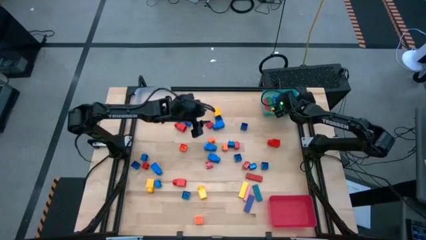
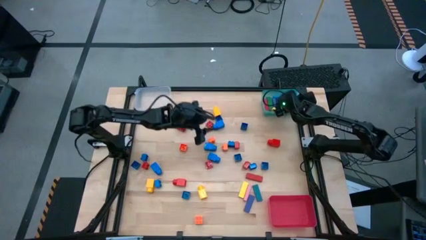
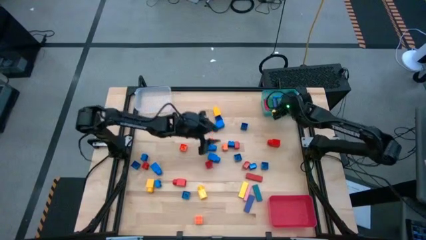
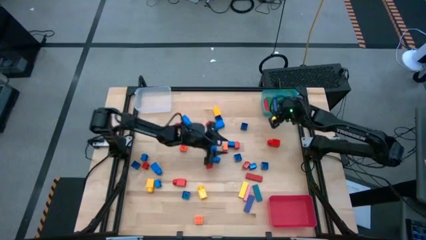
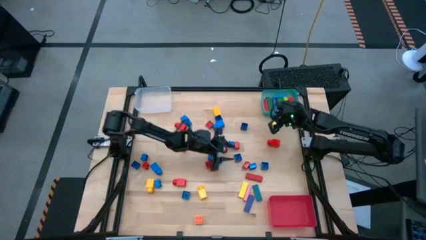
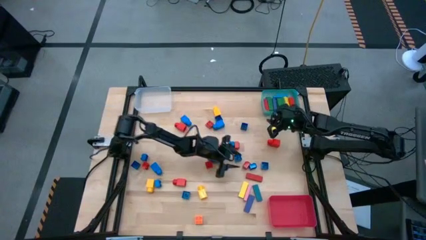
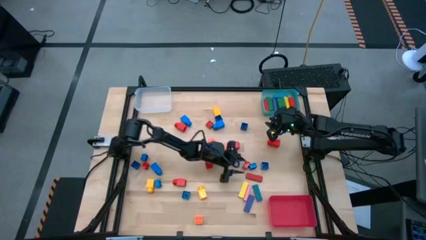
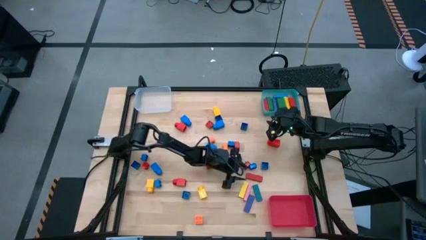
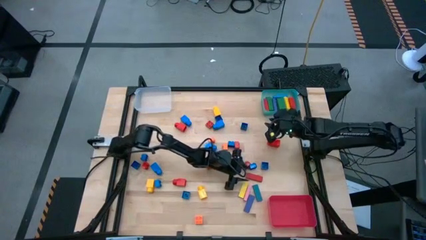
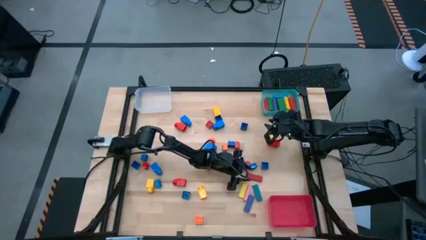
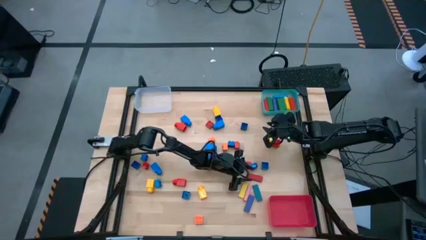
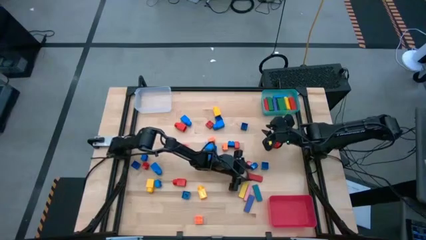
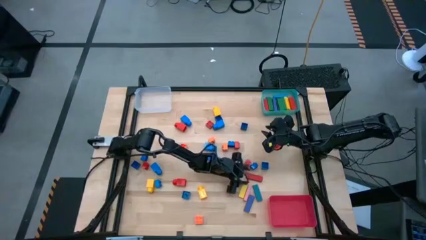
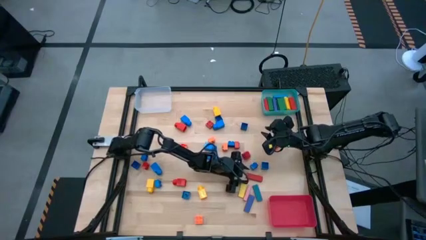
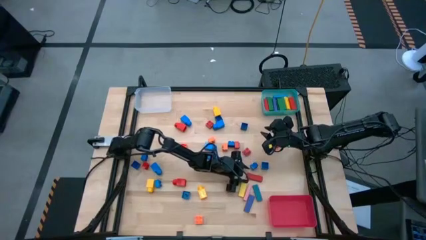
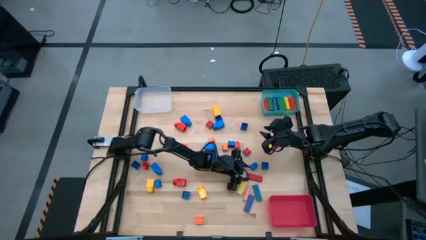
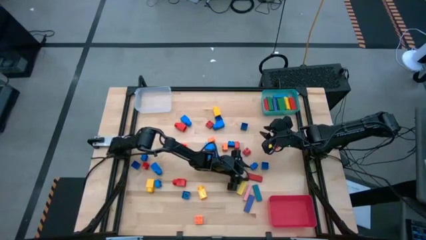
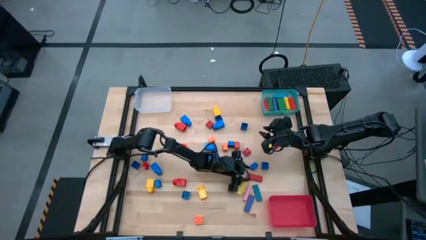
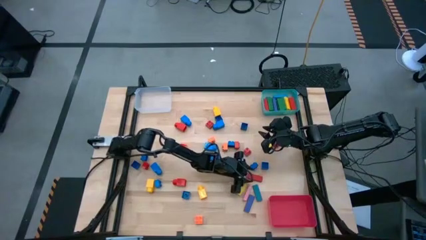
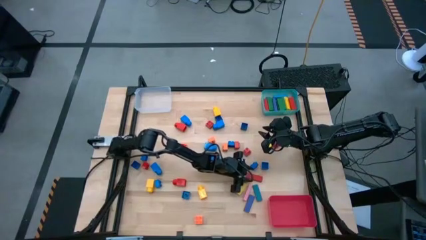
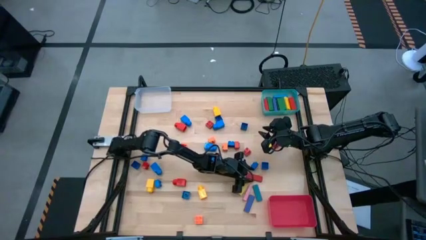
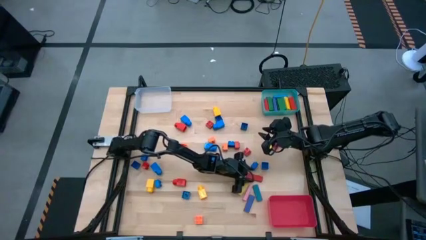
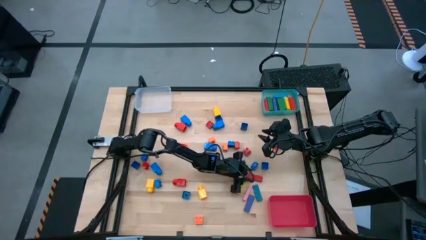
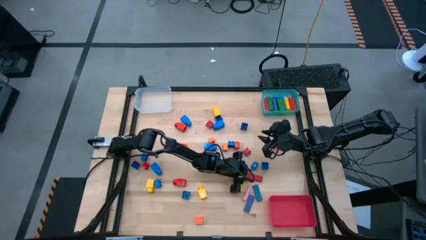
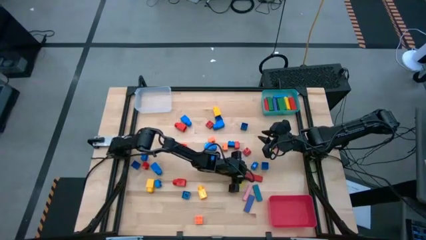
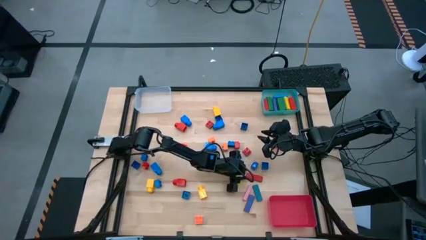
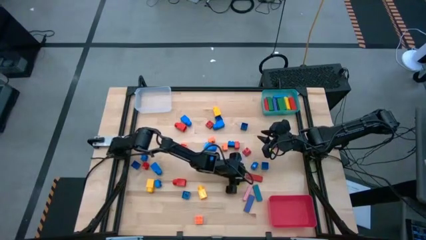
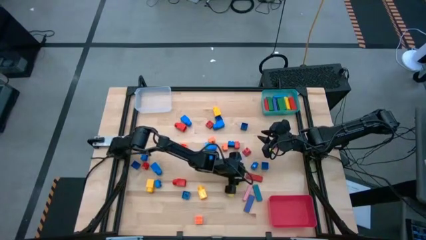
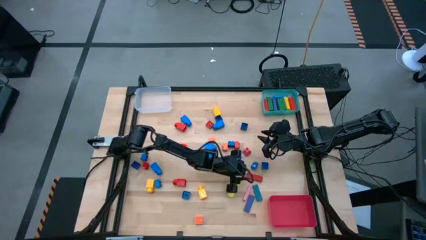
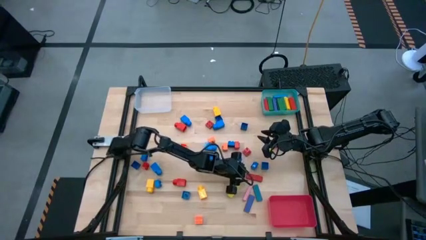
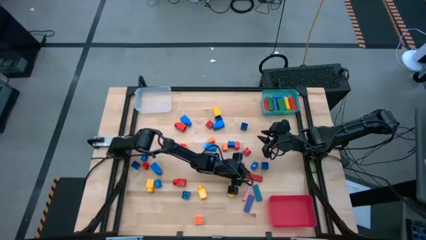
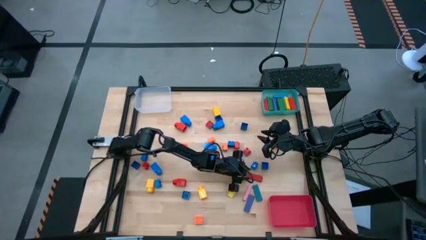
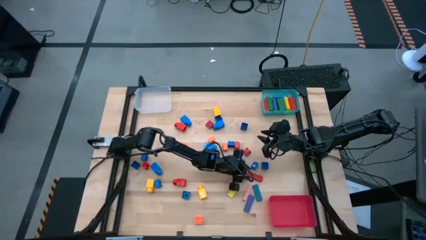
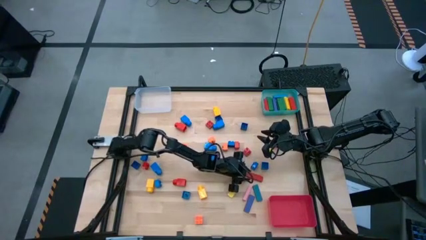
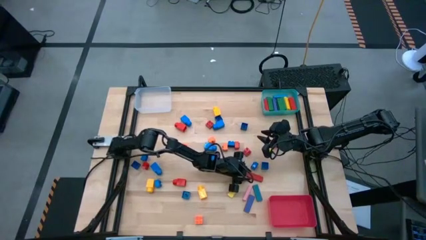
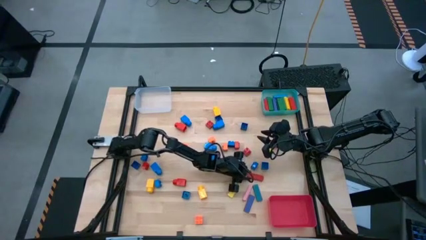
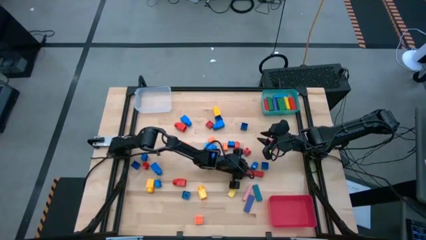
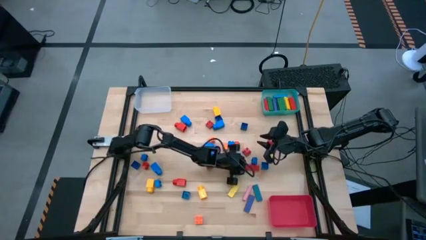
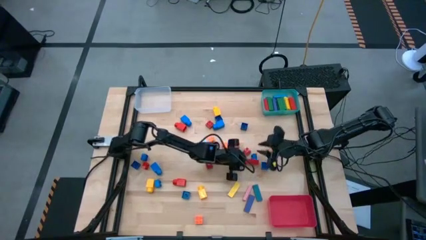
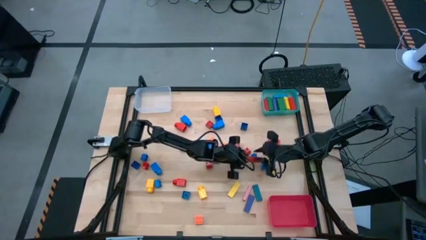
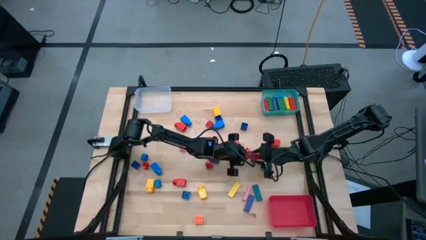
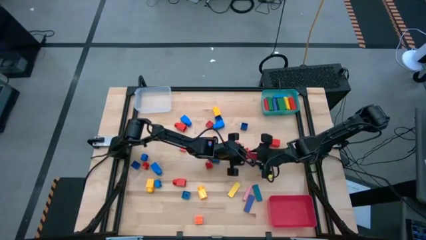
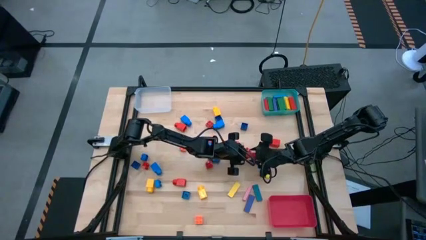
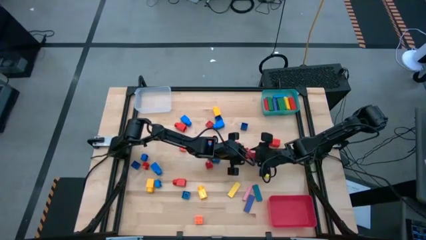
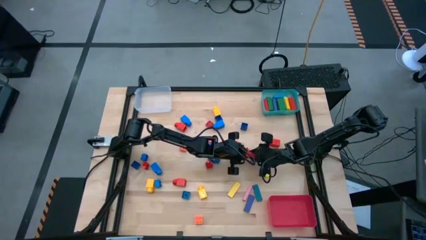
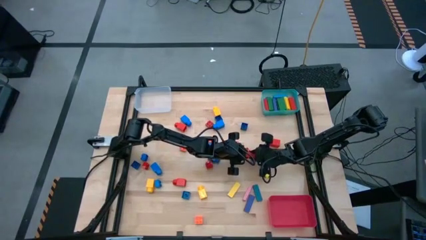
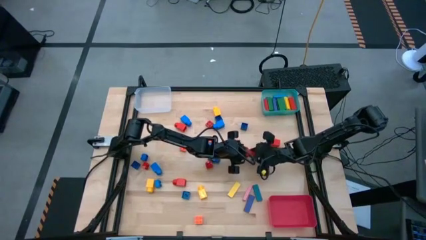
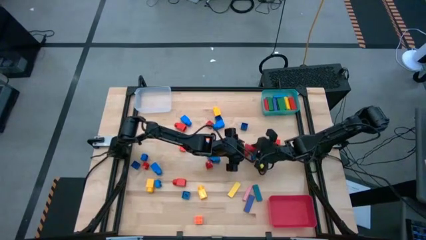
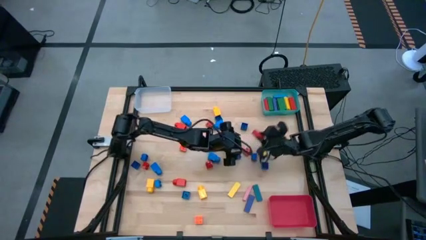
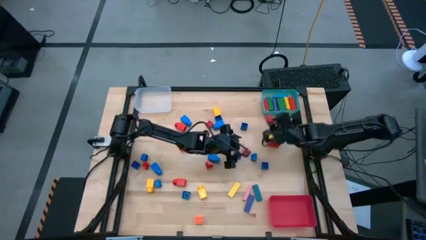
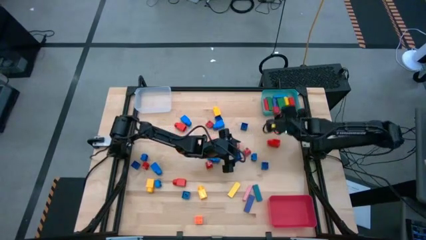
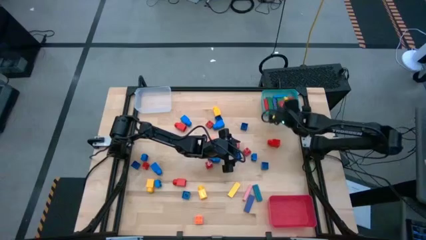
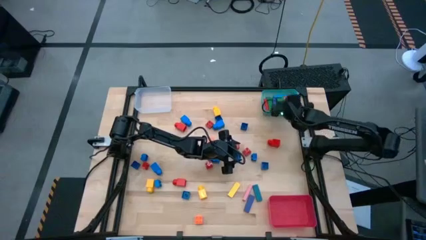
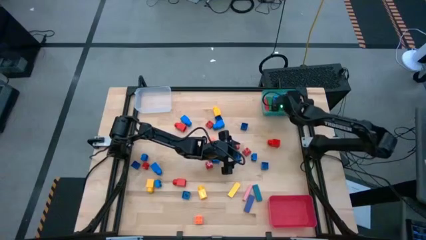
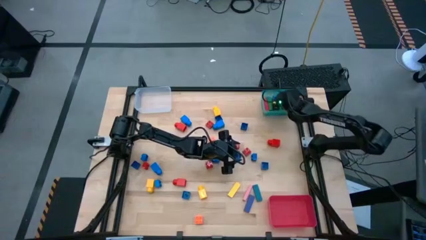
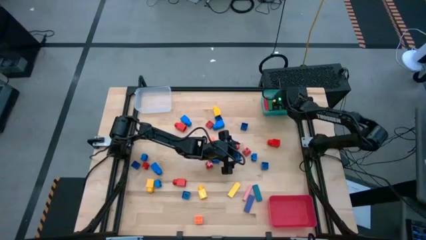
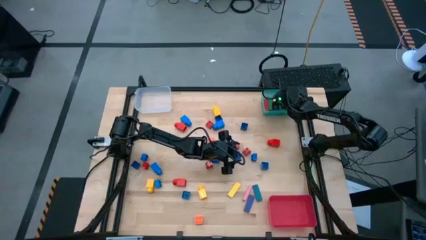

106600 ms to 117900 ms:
Task: Sort blocks by size
Put the red block into the blue bin

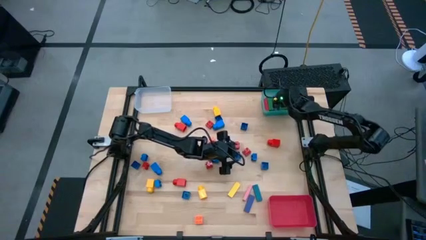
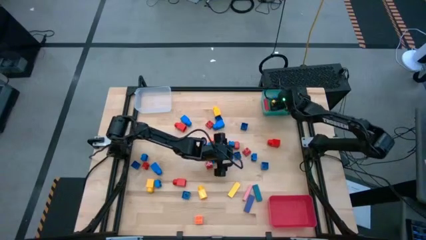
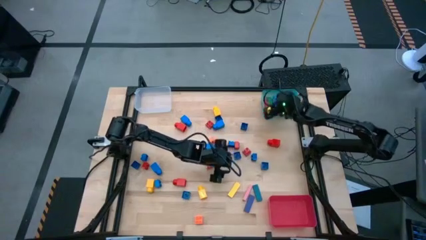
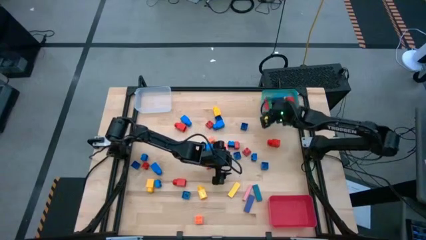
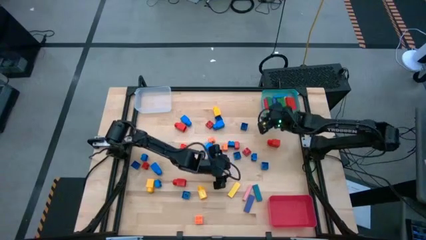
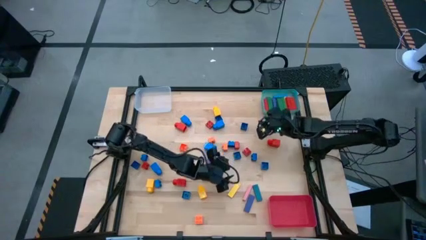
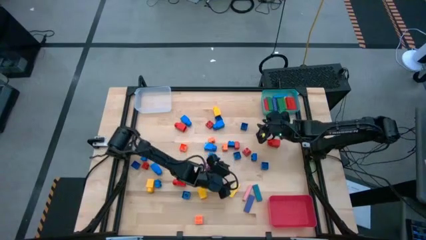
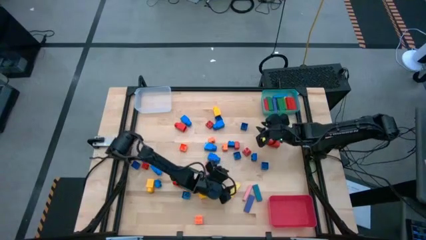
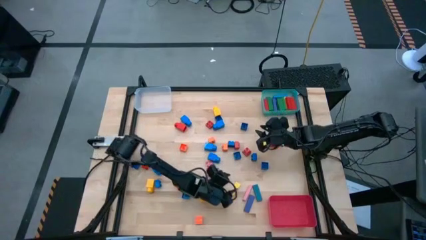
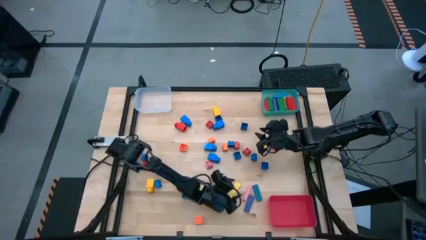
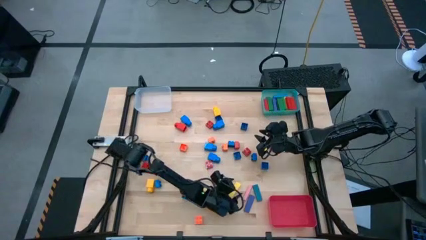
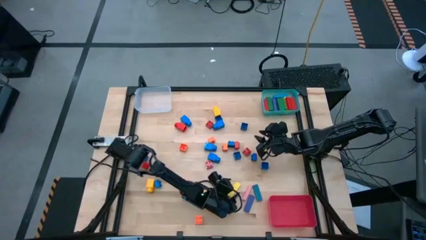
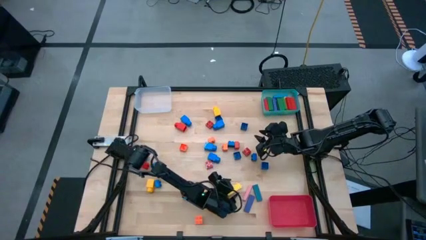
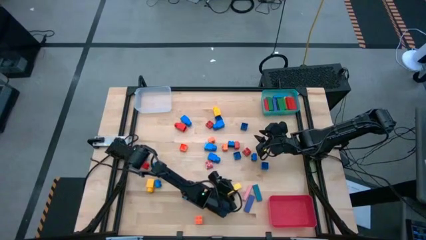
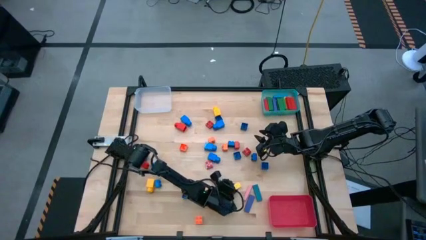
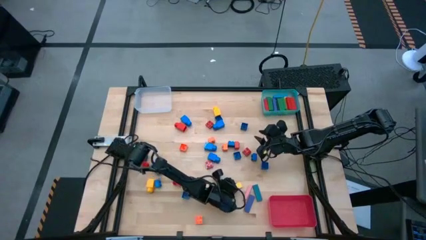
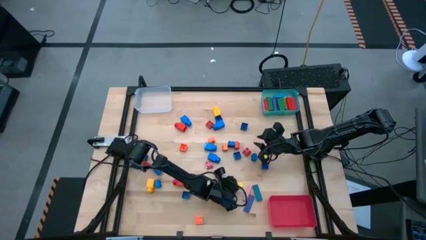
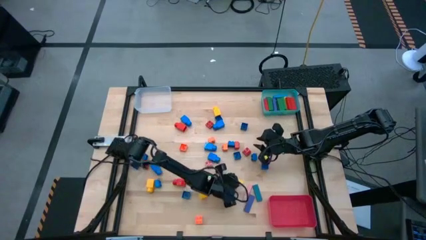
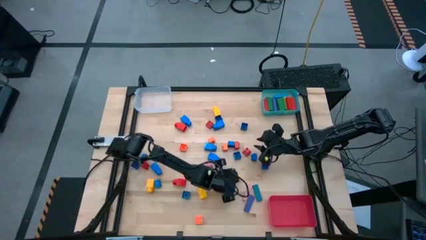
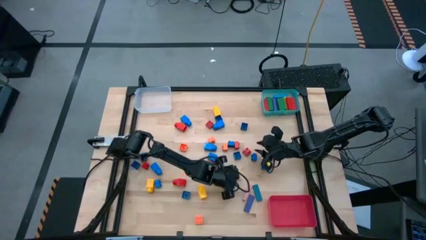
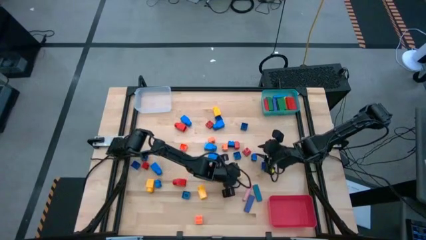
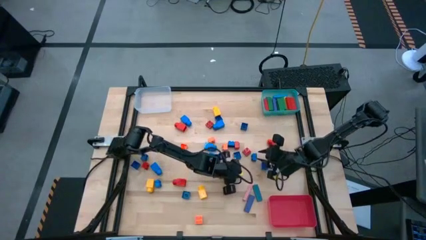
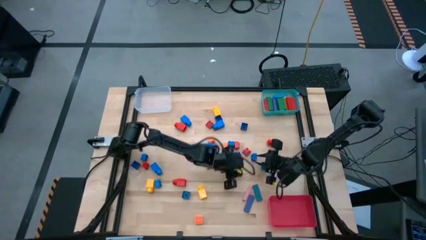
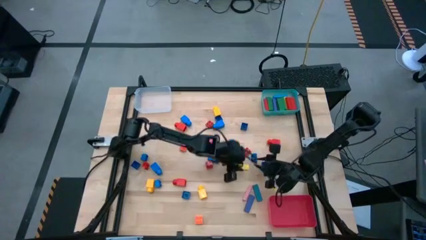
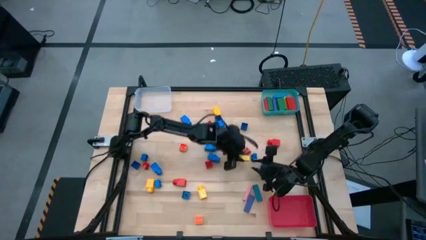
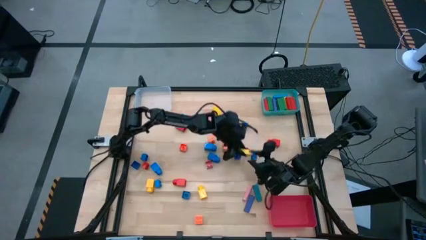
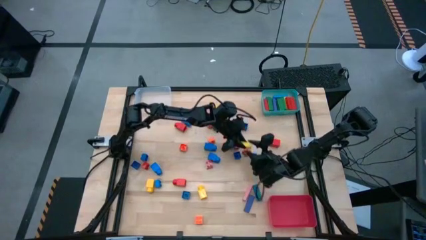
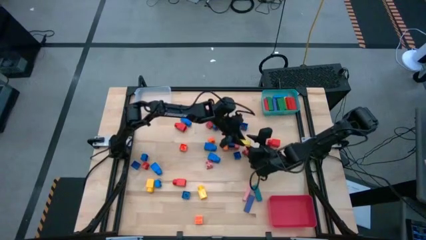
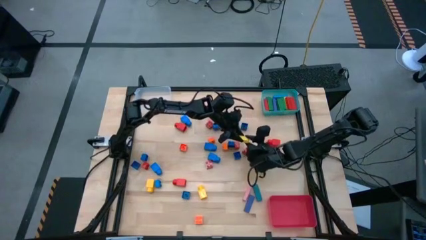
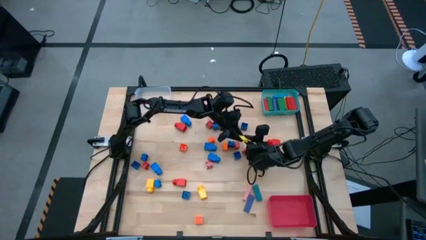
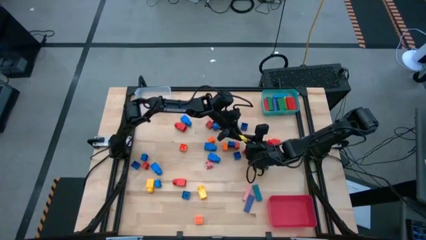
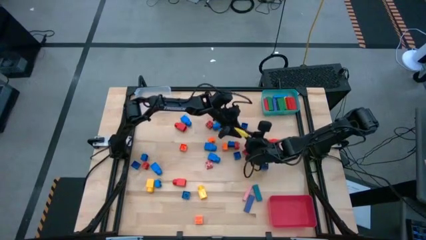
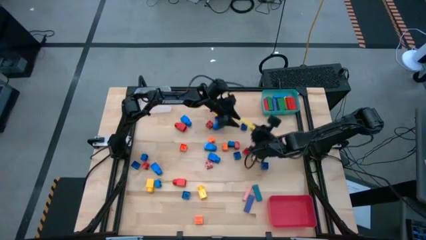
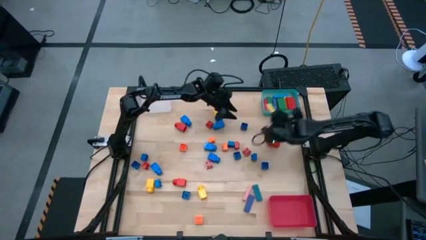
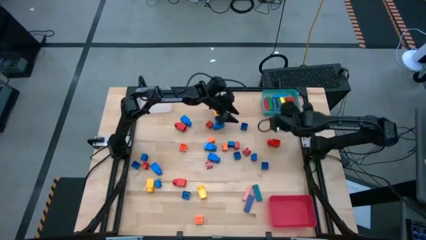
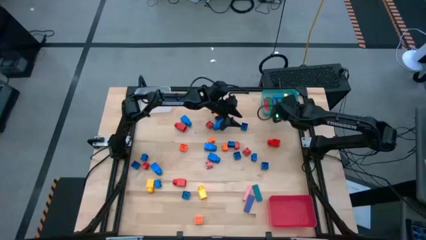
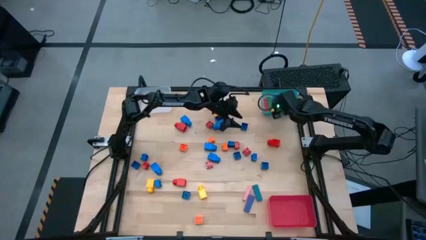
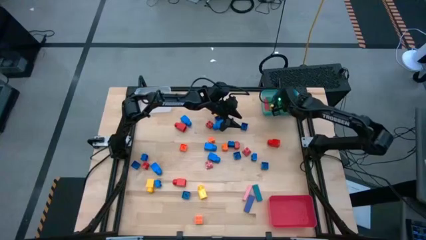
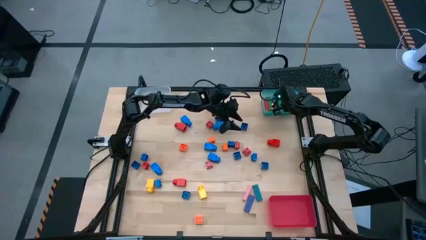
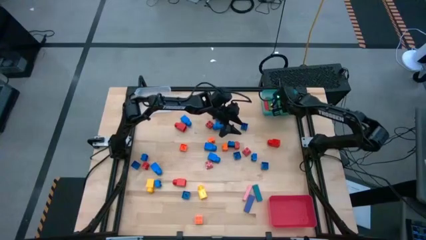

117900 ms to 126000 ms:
Put the yellow block into the blue bin
